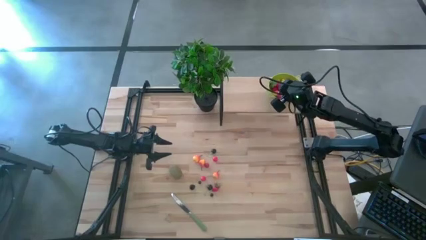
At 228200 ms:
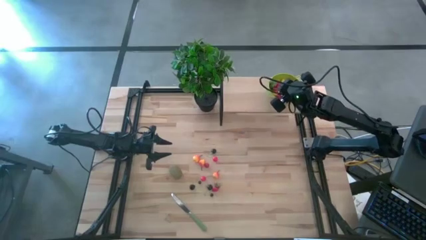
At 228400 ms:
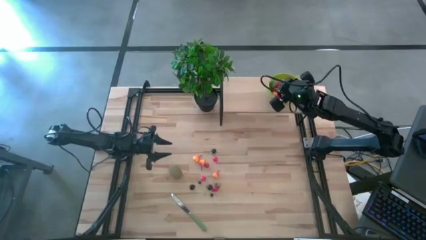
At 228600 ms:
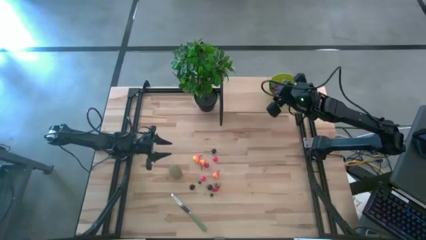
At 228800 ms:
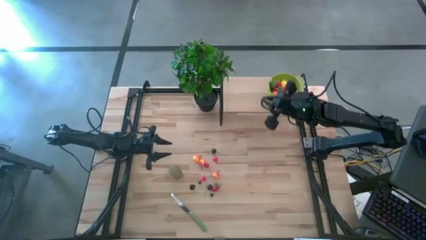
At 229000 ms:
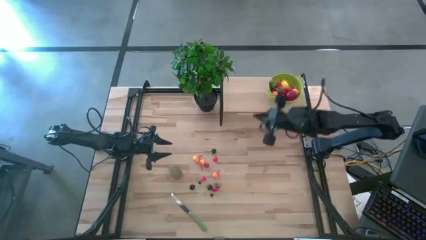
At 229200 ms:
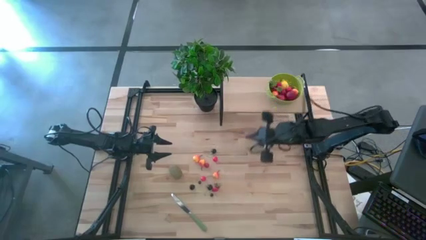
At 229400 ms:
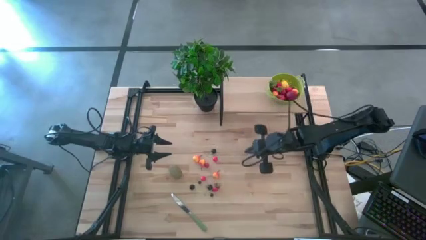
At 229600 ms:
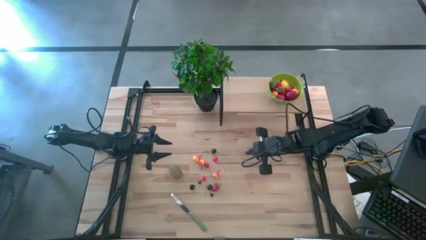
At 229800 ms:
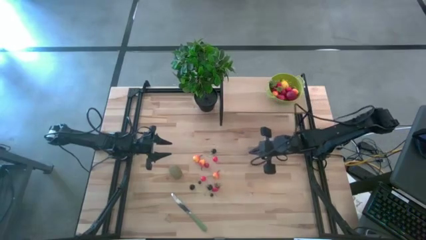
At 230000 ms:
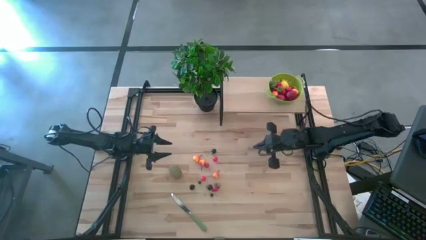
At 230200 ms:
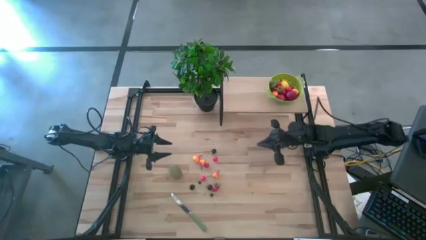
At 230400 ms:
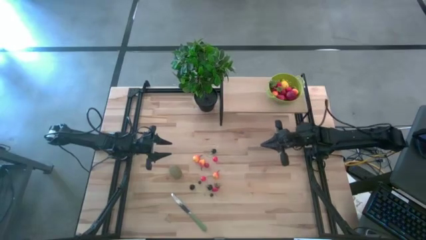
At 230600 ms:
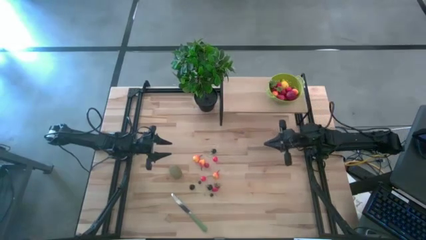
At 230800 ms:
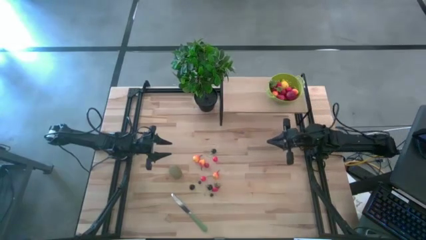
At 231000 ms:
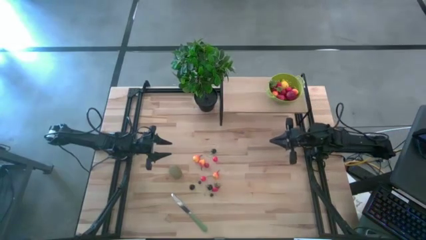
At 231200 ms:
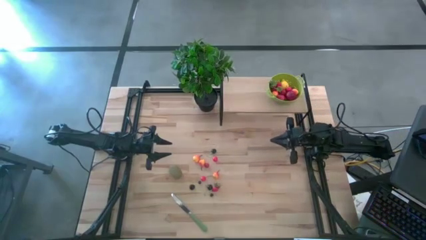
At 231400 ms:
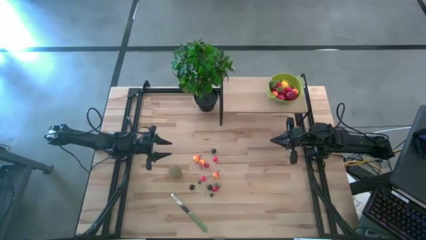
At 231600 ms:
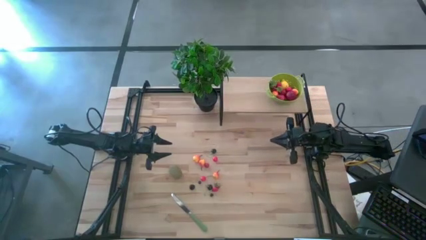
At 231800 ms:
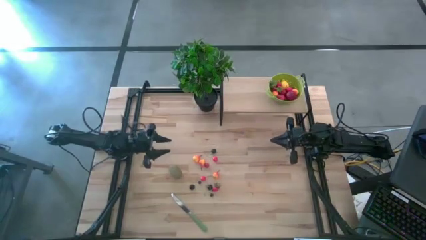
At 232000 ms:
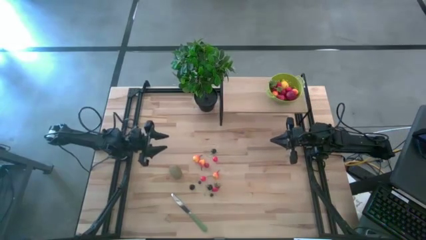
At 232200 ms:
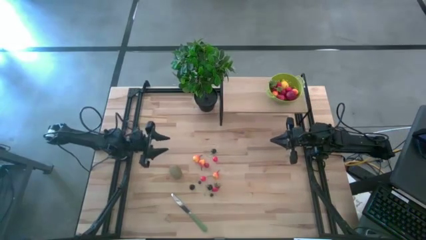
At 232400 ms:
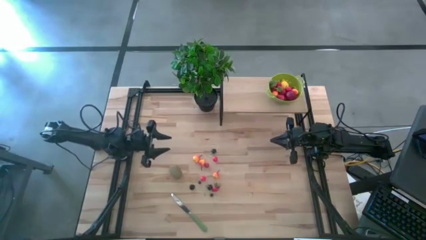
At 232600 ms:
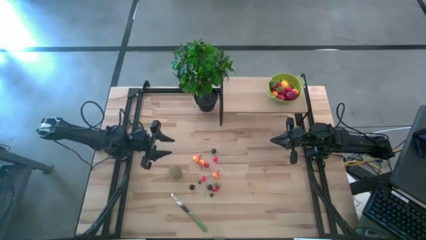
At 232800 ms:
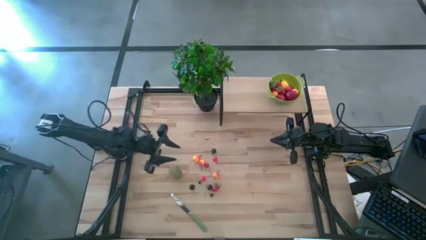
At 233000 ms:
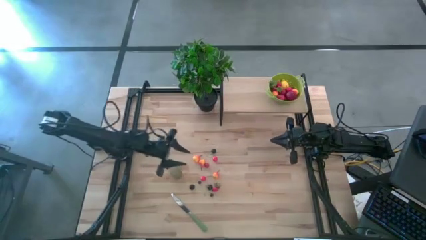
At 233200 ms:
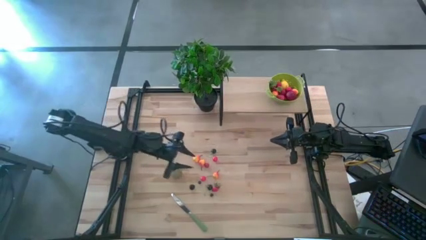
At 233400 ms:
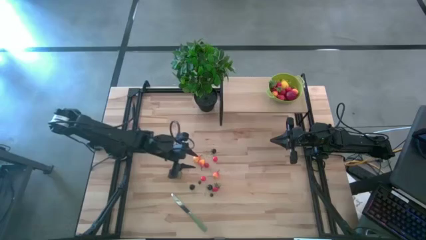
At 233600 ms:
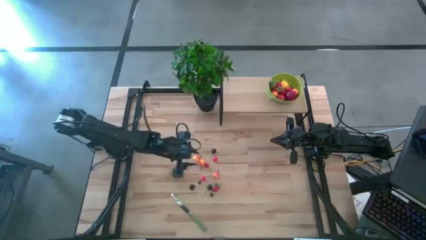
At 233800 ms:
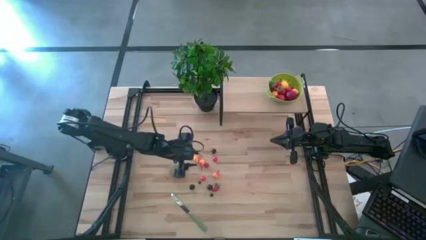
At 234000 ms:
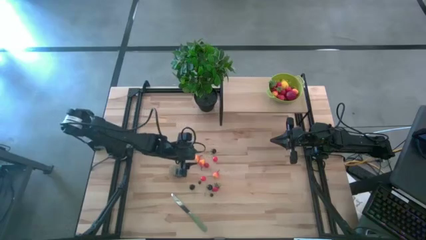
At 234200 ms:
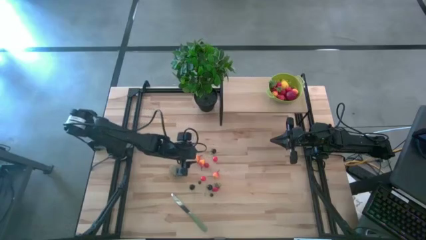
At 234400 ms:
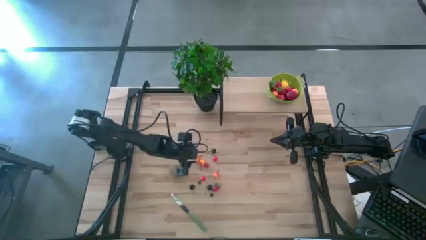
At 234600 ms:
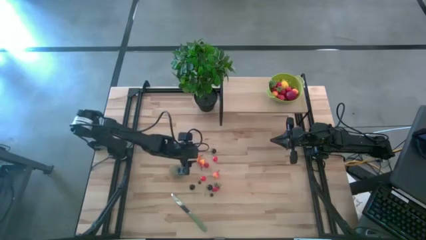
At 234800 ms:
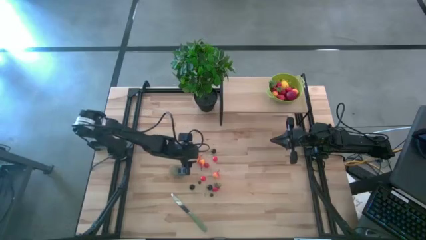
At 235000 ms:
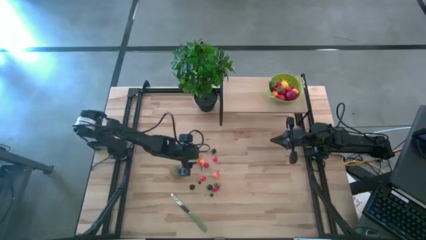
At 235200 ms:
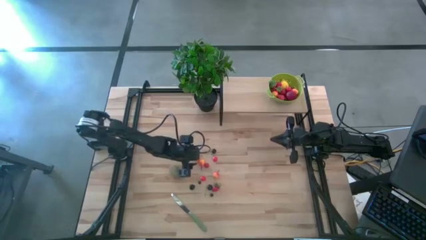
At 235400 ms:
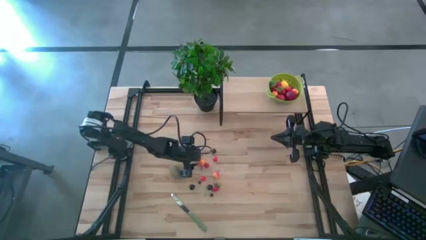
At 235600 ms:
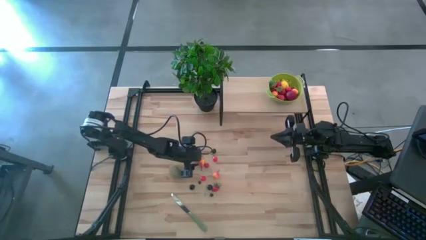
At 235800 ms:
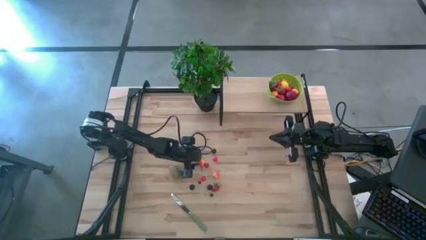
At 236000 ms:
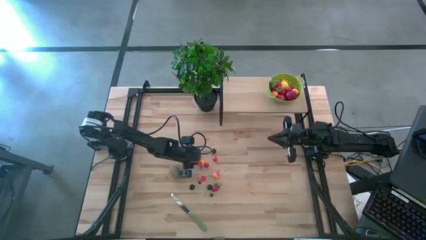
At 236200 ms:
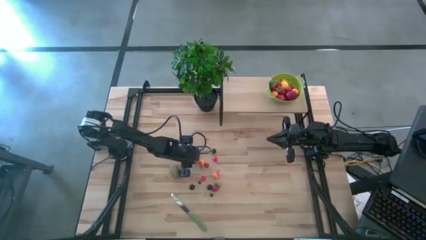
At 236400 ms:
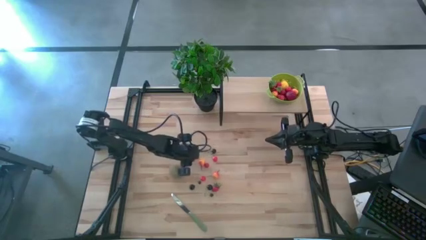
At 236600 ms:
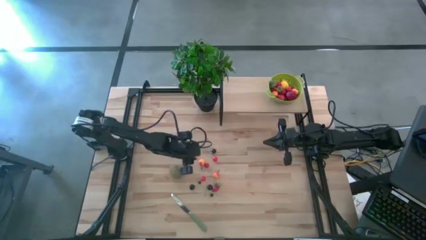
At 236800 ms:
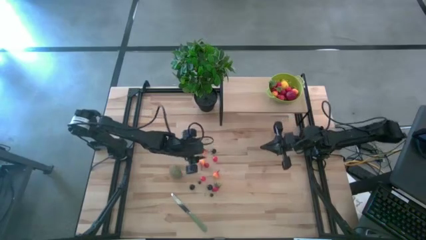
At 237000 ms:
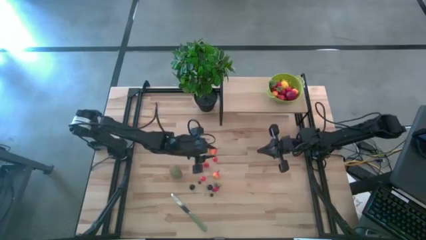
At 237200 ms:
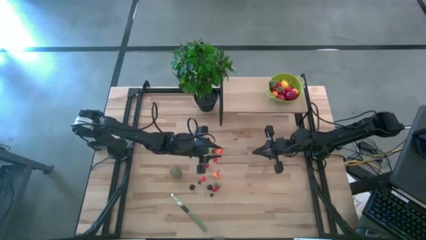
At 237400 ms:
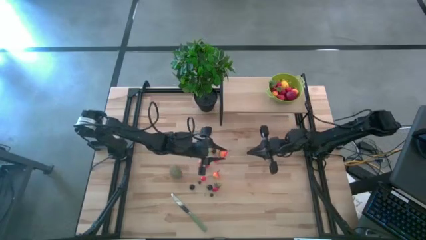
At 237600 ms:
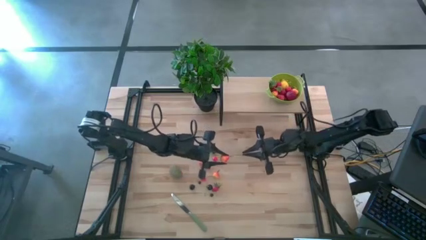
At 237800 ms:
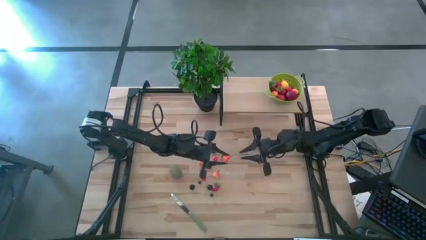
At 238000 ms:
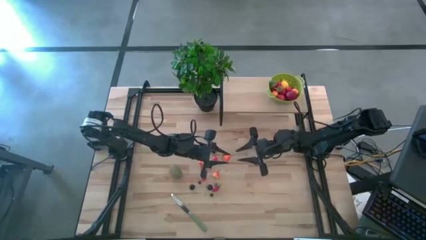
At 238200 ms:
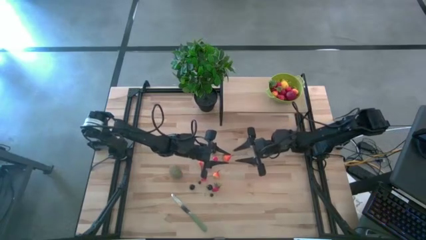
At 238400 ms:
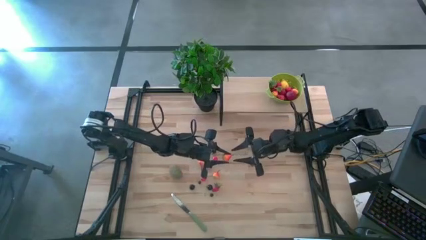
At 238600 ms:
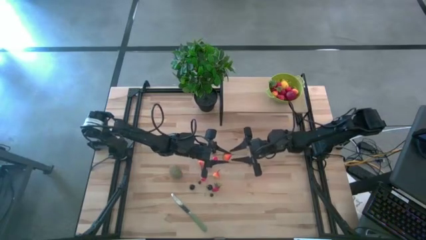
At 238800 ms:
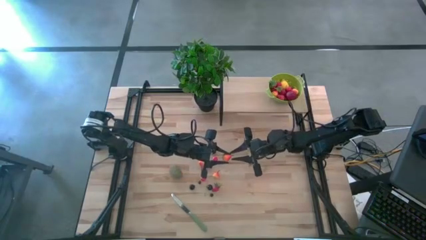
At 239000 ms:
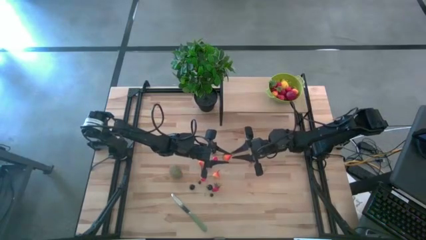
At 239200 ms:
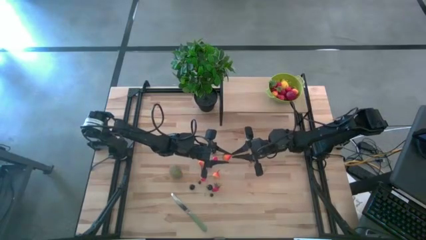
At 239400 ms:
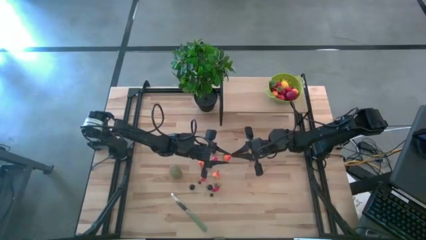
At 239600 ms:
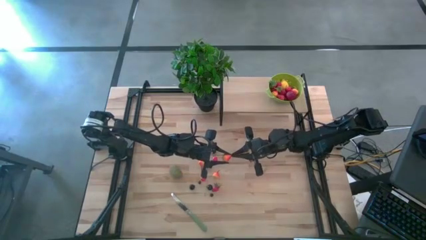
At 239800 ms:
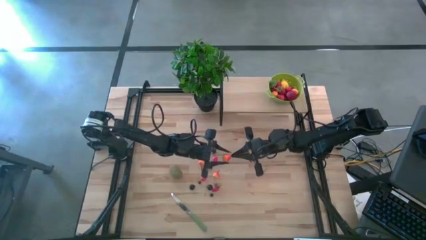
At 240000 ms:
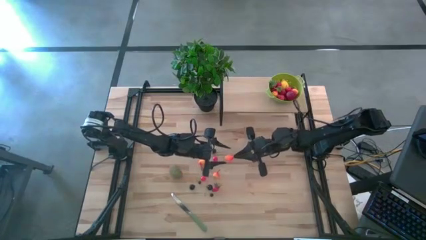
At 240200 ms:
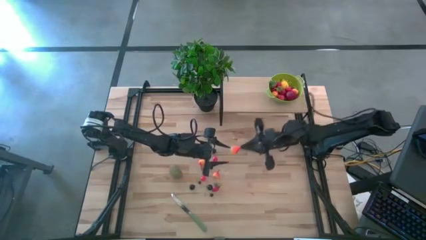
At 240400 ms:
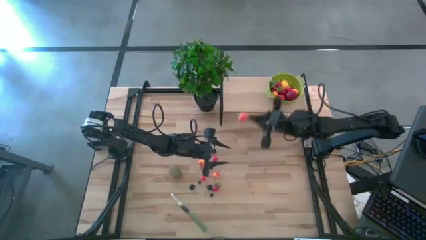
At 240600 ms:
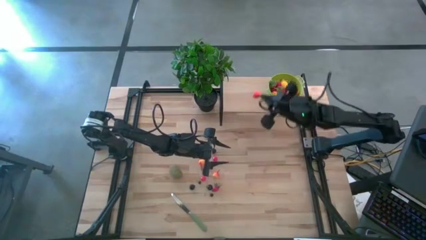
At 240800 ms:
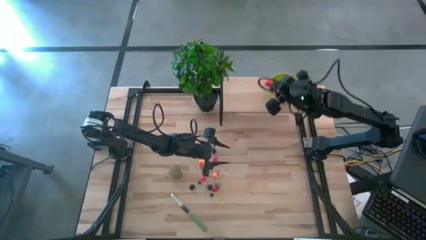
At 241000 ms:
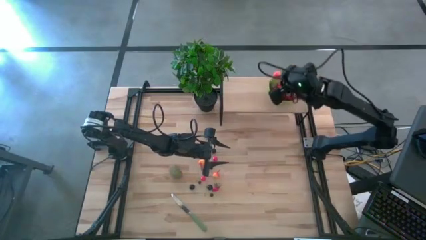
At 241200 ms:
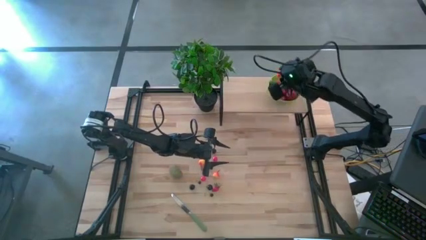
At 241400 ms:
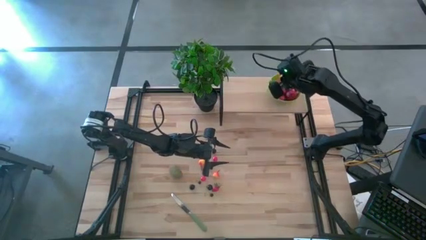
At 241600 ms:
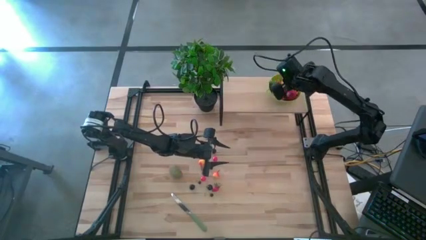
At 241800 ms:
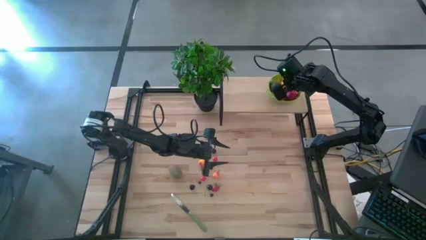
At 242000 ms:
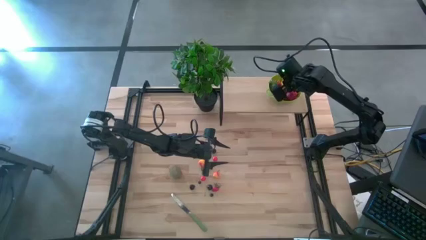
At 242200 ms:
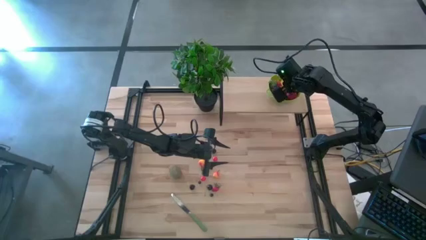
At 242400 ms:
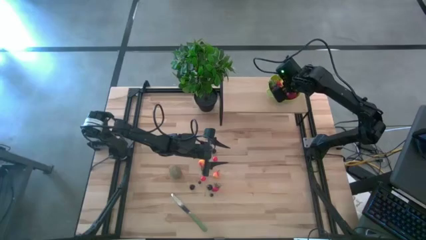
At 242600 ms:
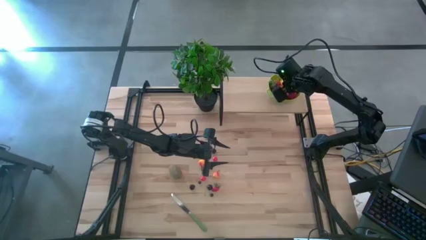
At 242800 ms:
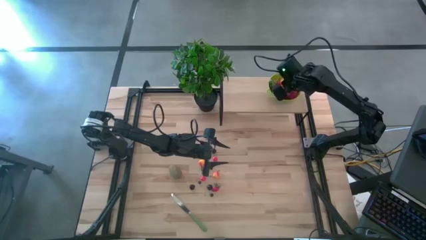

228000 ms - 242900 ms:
Task: Pick & Place Fruit
Put the pear into the green strainer bowl on the shelf
